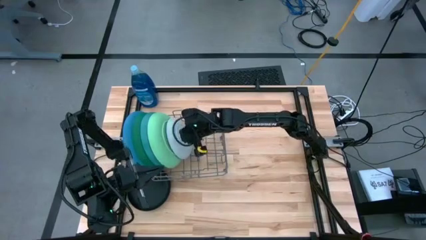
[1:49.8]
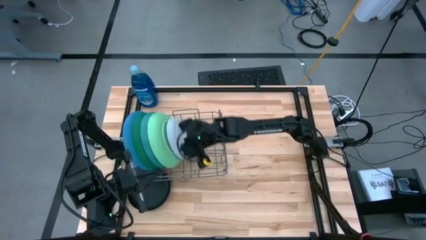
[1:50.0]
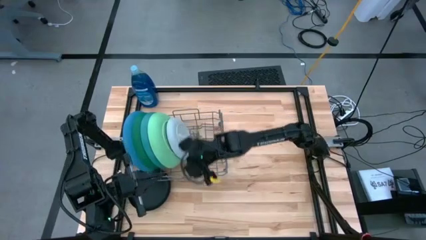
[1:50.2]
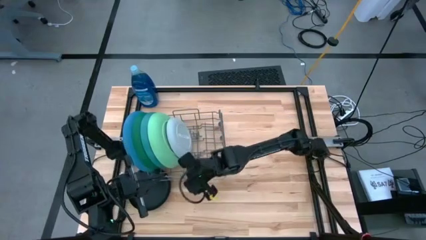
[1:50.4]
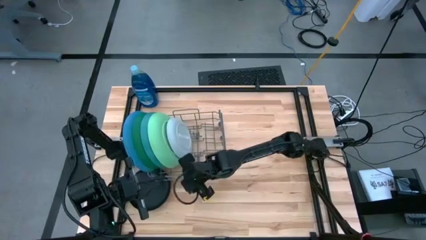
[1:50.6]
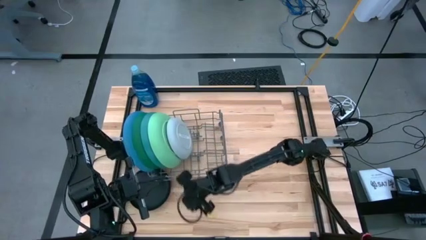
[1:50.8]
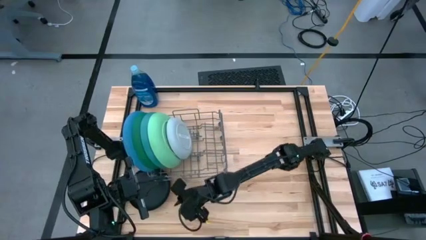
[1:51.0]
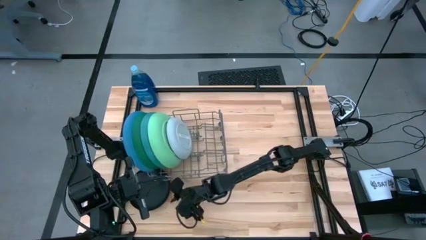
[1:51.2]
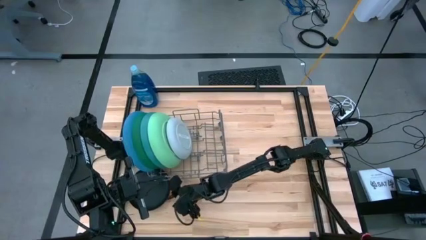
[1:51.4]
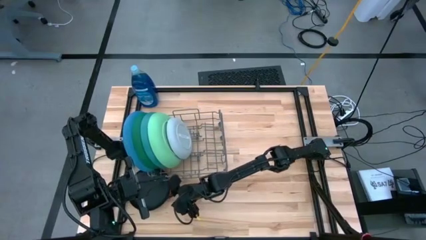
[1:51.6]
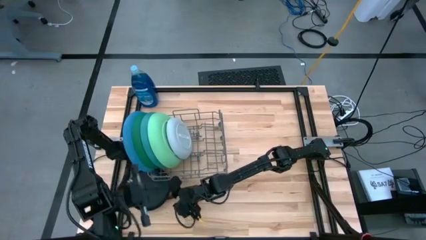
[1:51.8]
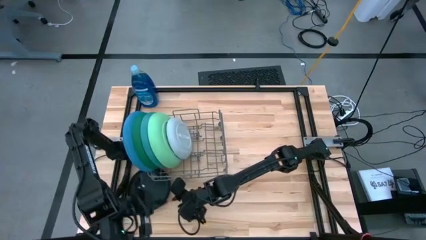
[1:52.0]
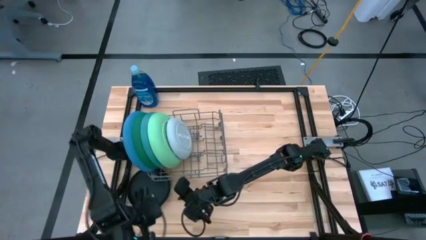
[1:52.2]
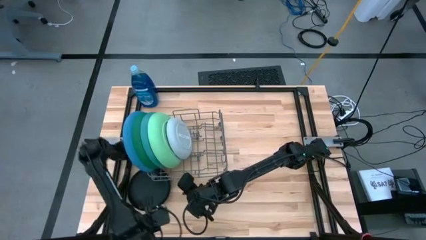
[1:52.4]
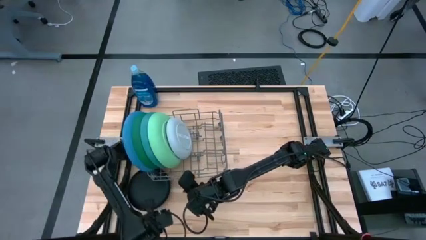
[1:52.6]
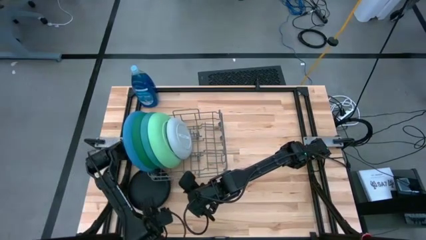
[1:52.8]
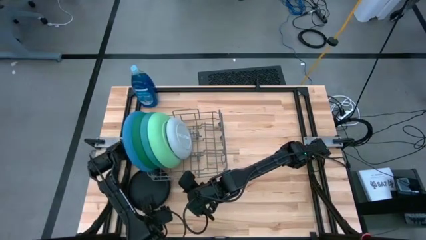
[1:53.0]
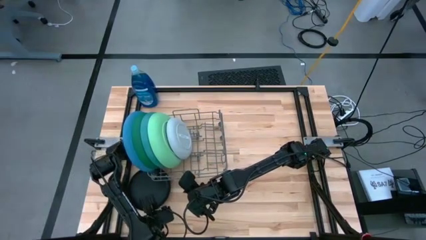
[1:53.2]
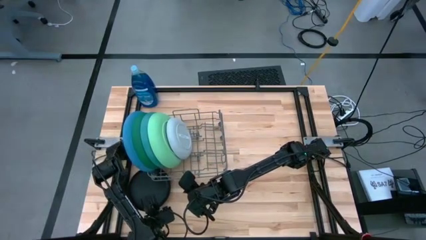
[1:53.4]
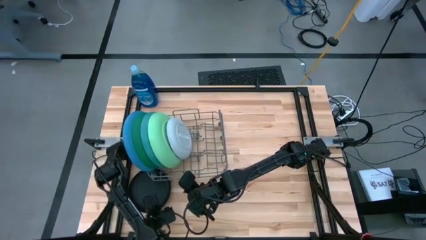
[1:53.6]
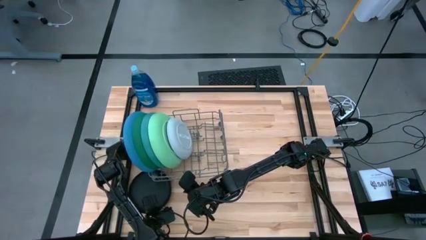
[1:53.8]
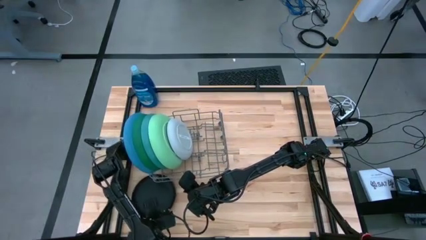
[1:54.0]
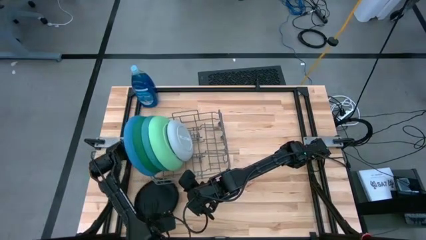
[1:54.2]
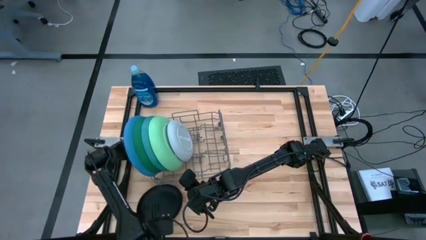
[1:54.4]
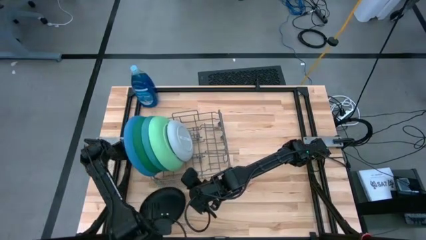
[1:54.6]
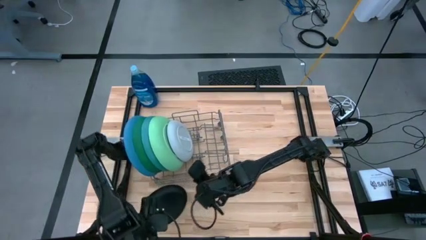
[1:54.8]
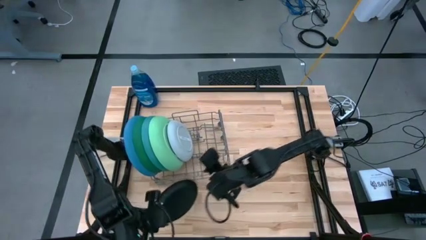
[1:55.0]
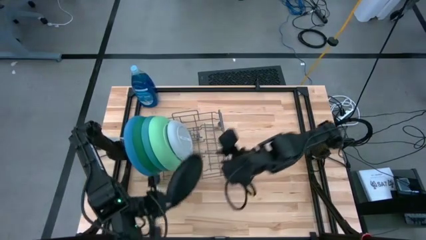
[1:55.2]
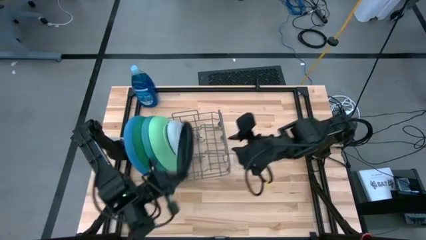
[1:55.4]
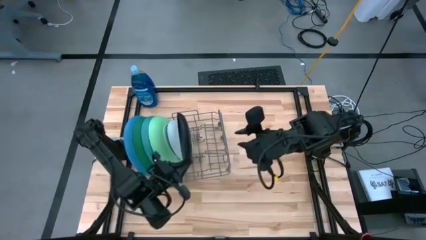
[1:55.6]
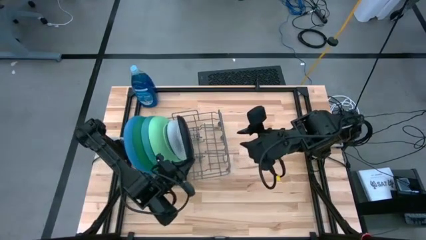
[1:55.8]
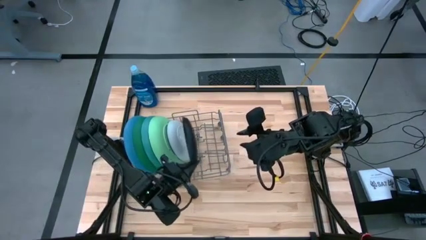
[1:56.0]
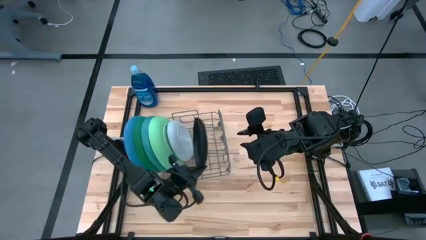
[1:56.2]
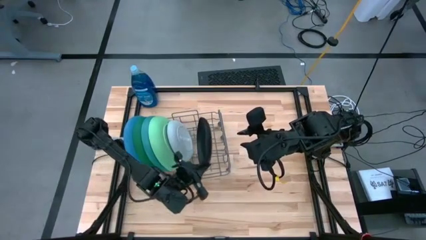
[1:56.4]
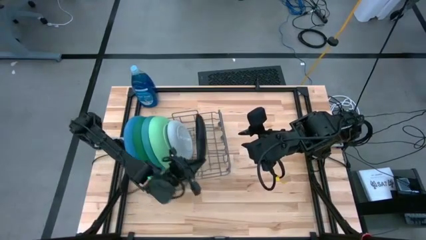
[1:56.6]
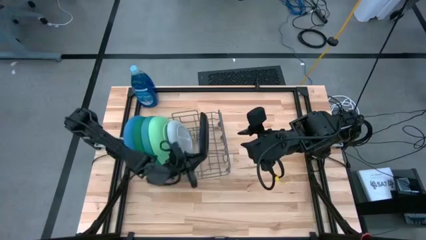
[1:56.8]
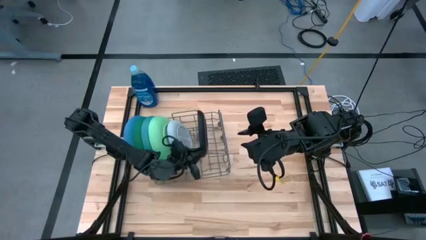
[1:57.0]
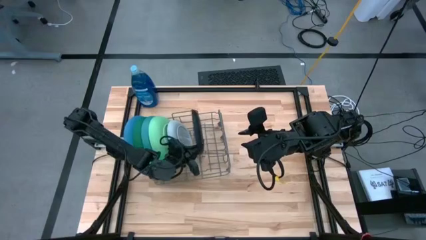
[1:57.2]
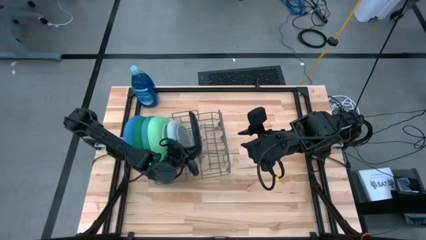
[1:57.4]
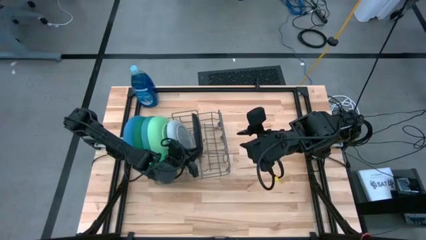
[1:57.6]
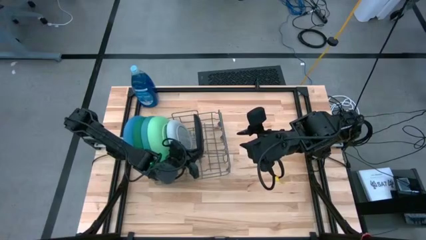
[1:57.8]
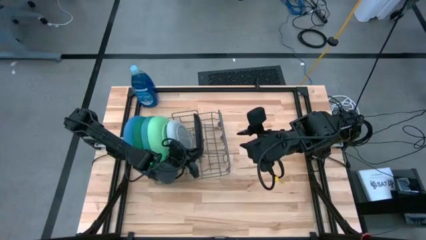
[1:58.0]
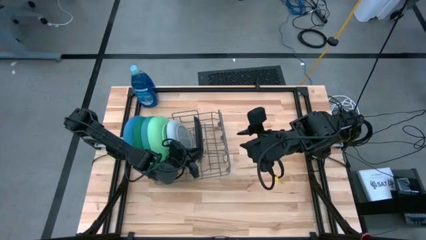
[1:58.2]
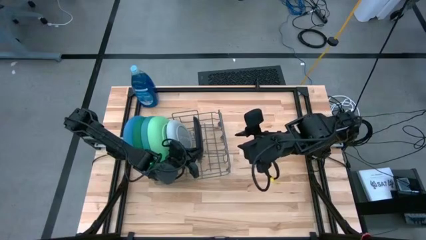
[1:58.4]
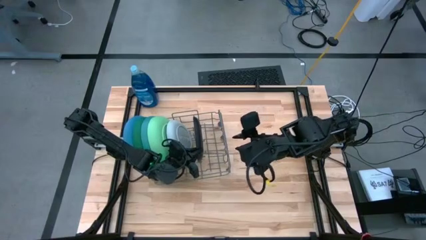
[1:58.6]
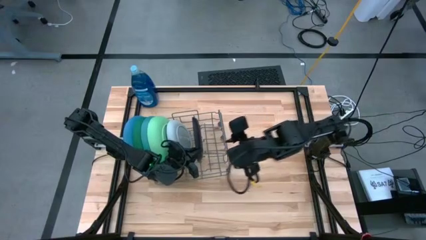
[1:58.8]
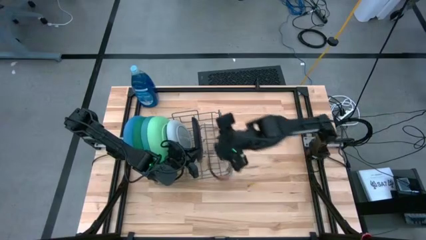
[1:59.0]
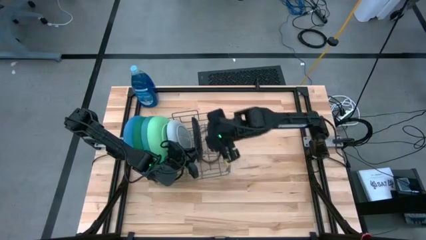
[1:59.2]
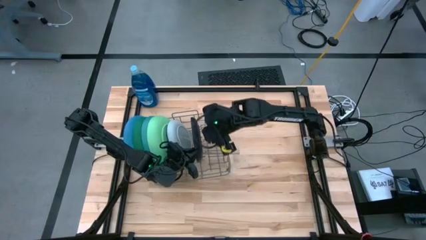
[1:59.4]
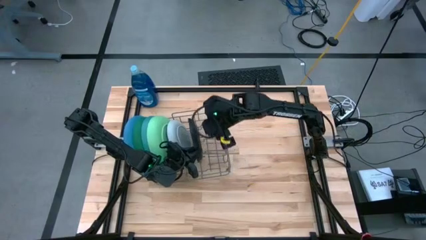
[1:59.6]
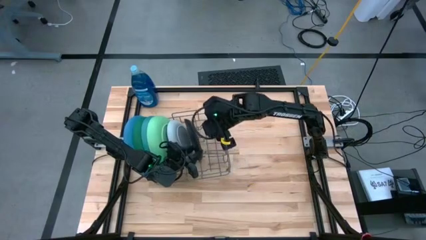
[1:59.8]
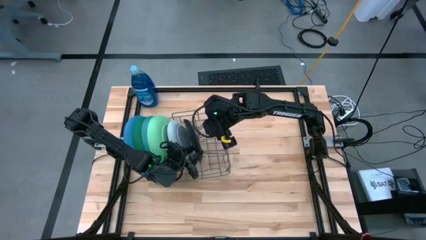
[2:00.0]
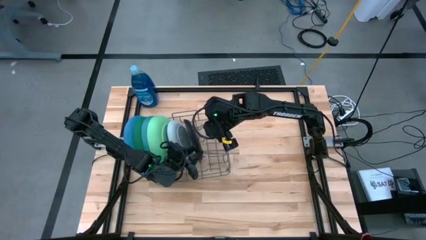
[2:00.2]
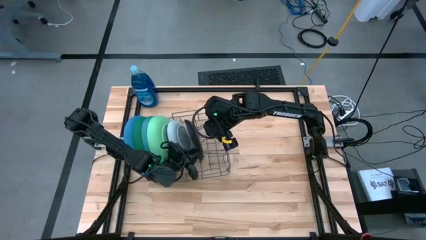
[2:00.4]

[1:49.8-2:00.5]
Task: Sort dishes
Put the black plate into the gray dish rack

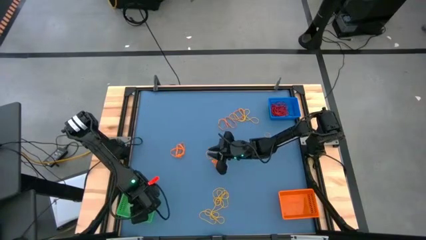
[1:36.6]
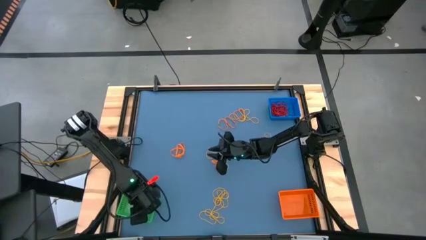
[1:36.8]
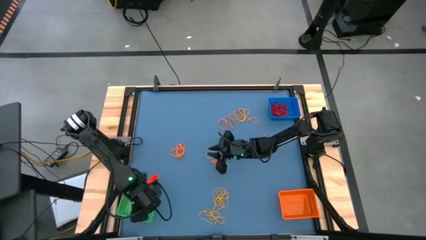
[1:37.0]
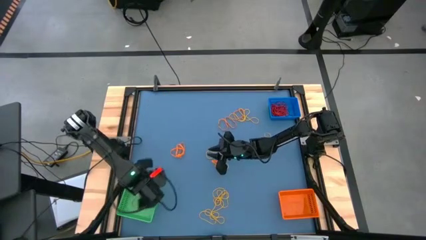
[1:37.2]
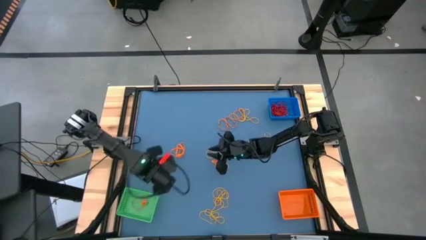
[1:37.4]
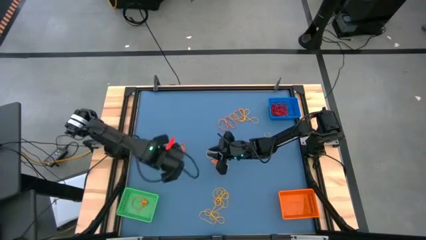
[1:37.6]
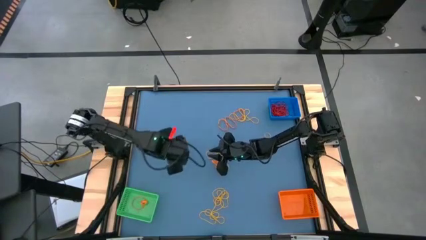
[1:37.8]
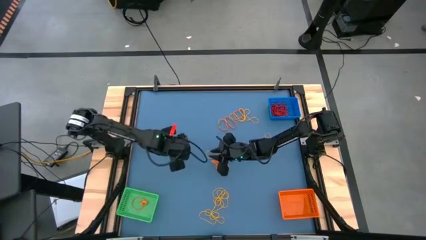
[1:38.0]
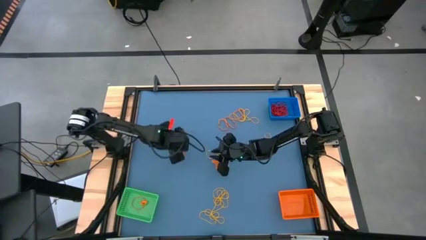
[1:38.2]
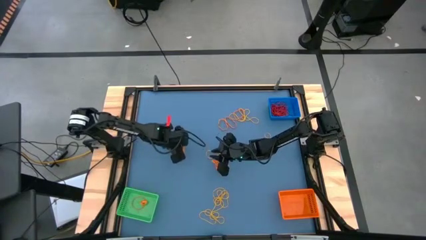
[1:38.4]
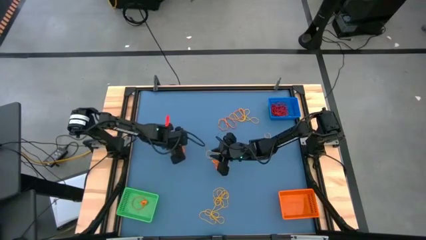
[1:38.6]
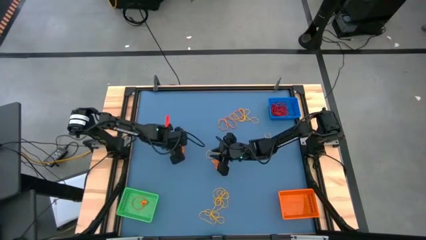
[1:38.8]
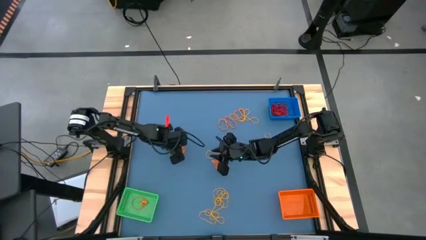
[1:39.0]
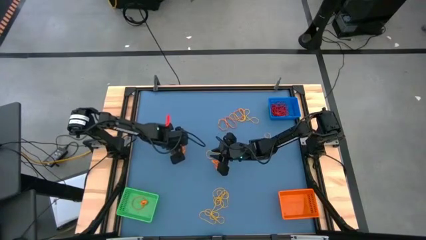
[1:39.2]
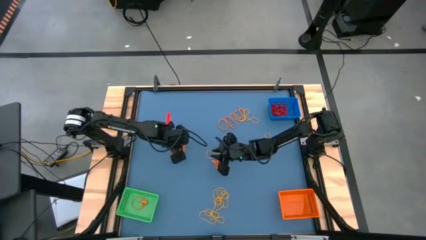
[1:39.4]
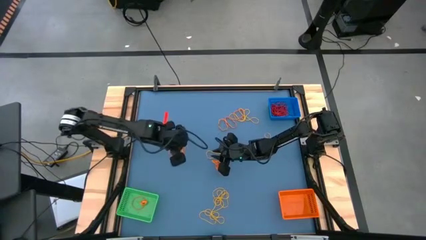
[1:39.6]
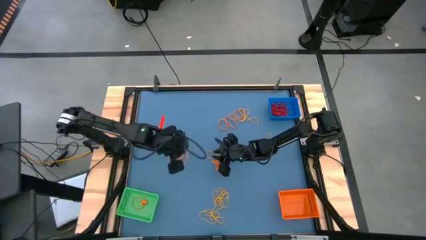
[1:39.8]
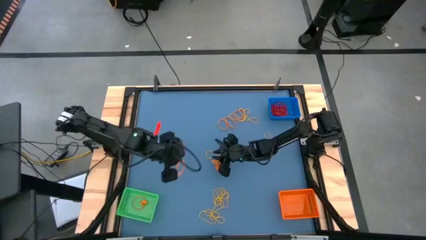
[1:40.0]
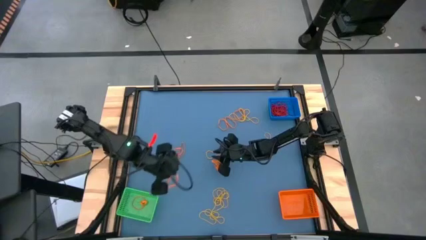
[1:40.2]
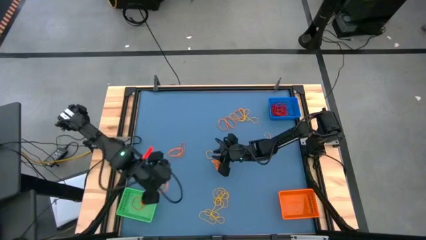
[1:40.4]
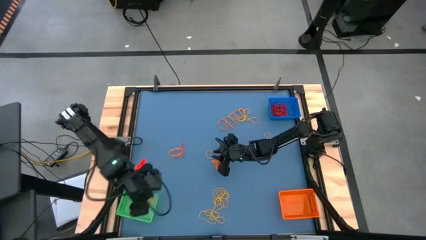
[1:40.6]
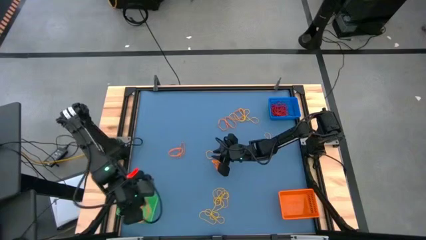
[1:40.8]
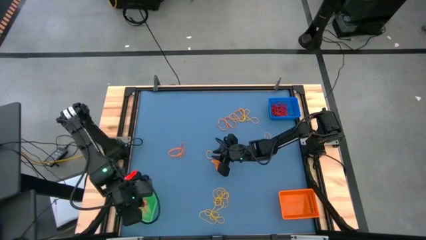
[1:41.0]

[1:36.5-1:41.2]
Task: Sort rubber bands into baskets
Put the orange rubber band into the green bin
